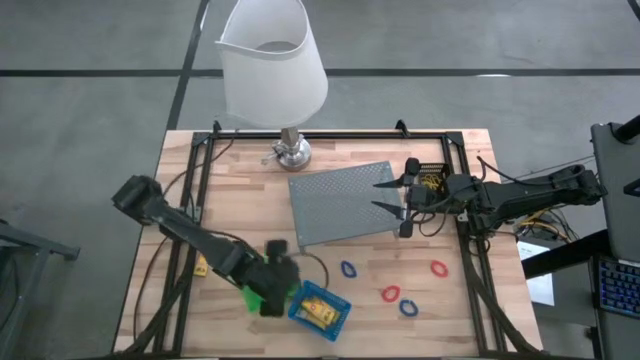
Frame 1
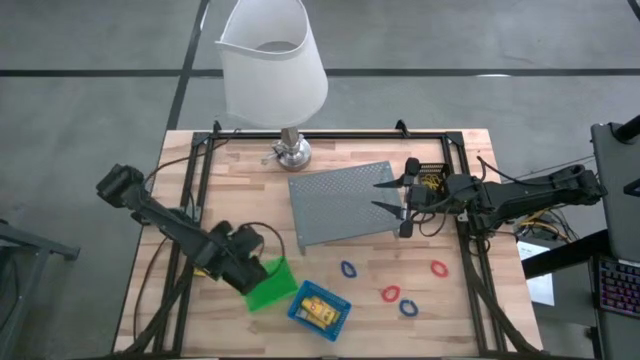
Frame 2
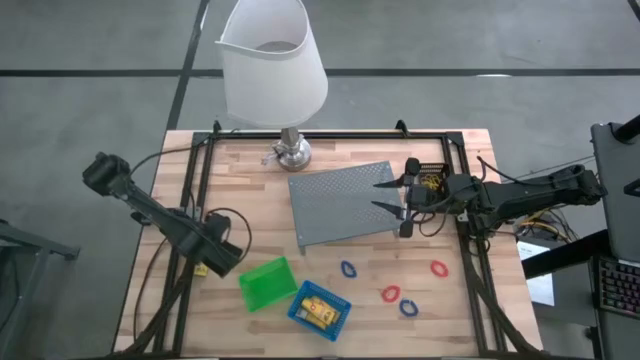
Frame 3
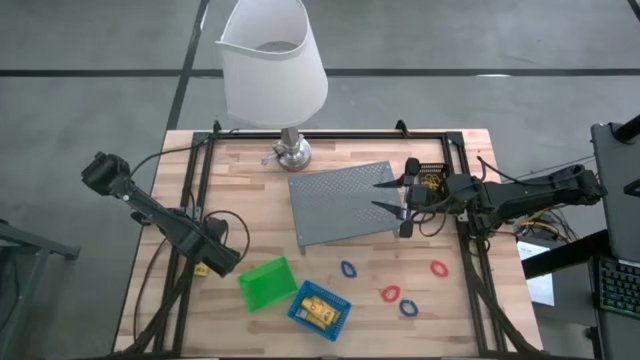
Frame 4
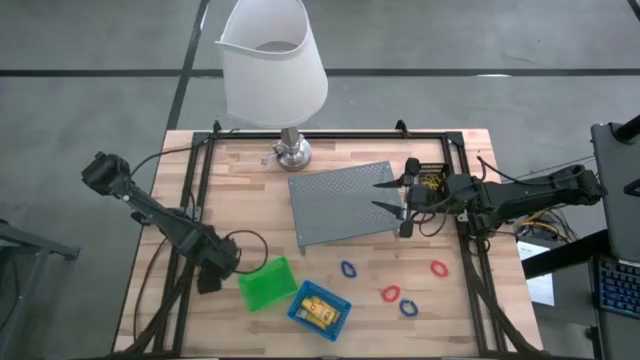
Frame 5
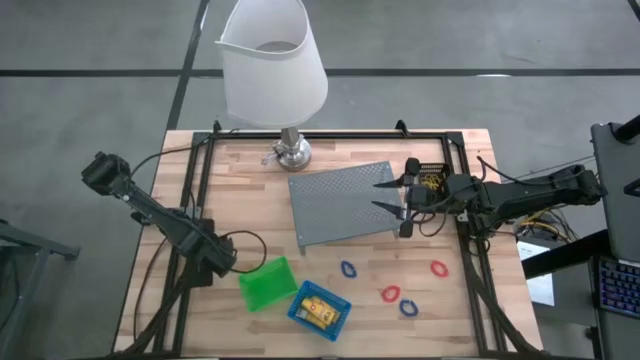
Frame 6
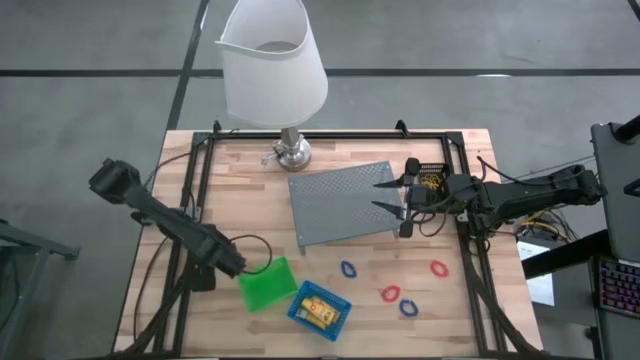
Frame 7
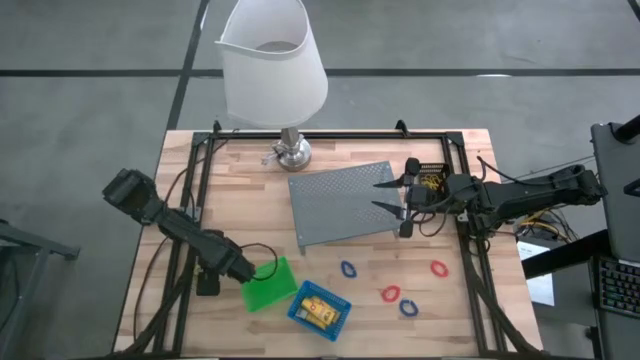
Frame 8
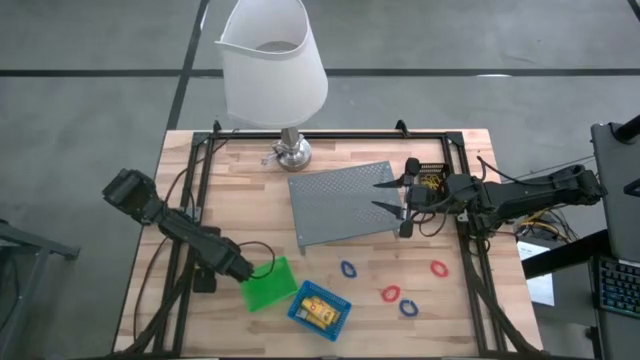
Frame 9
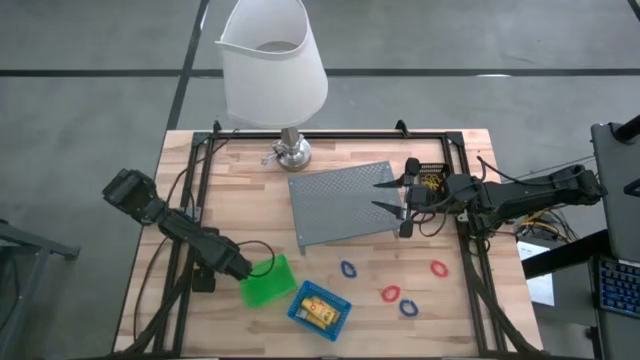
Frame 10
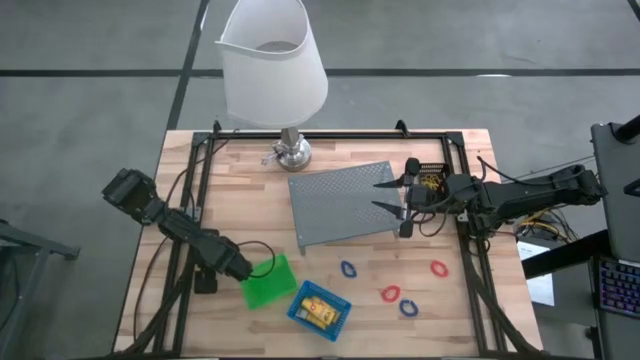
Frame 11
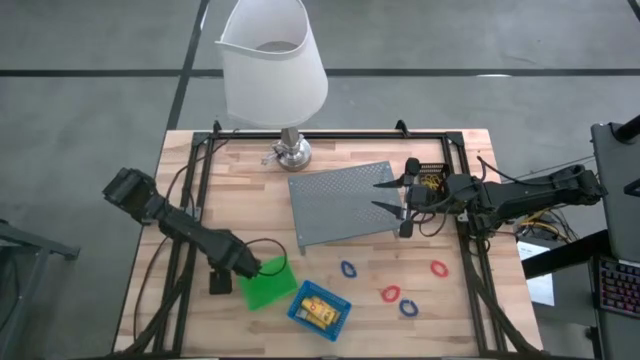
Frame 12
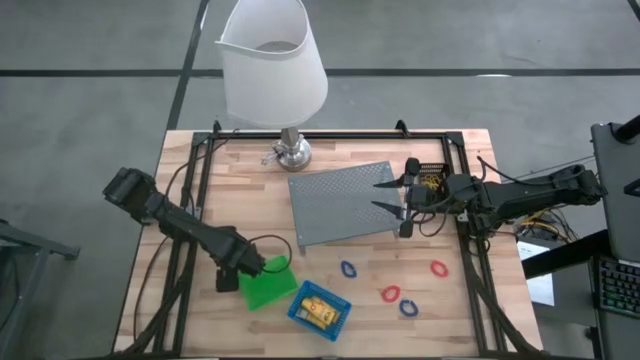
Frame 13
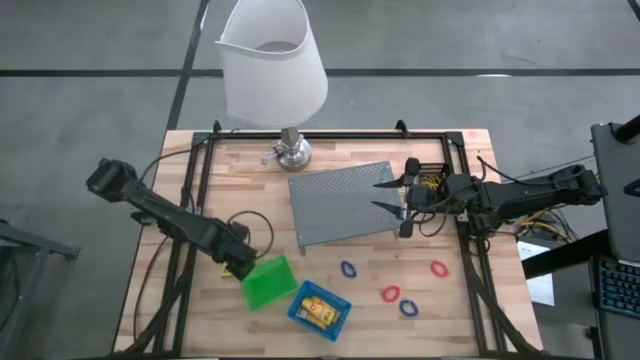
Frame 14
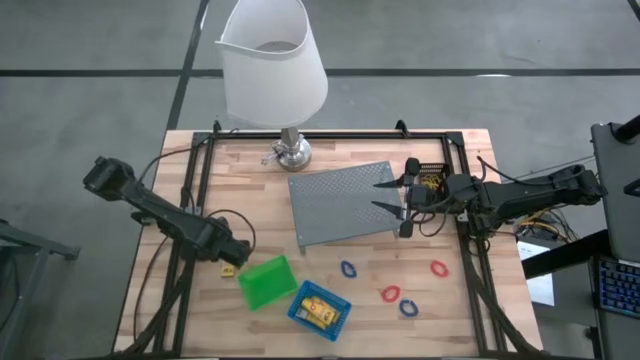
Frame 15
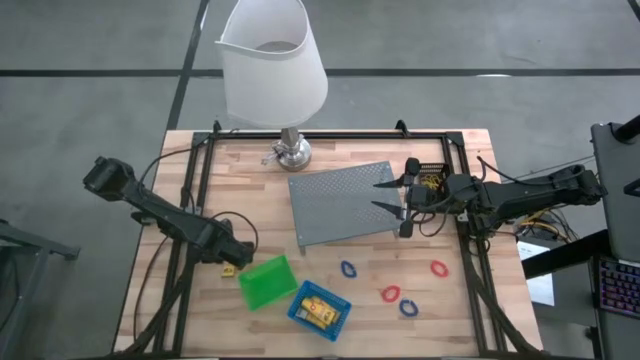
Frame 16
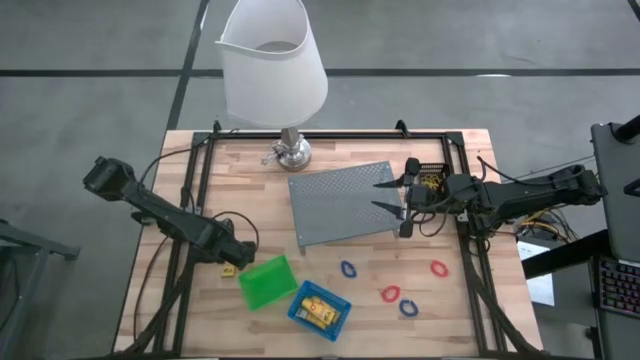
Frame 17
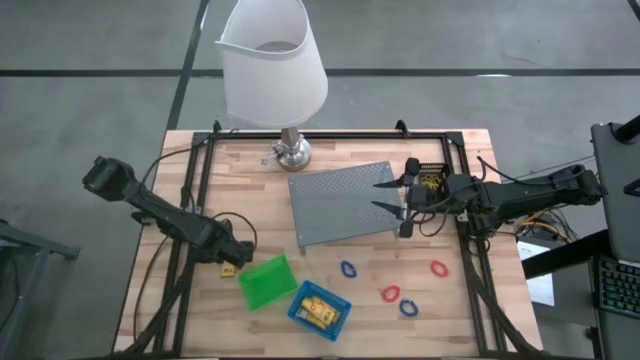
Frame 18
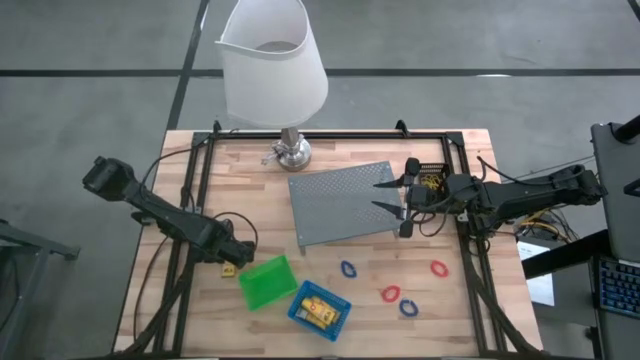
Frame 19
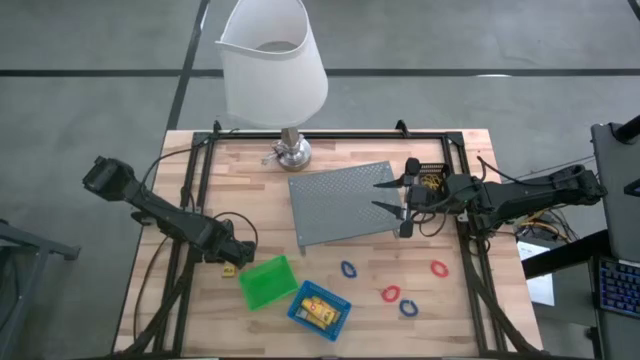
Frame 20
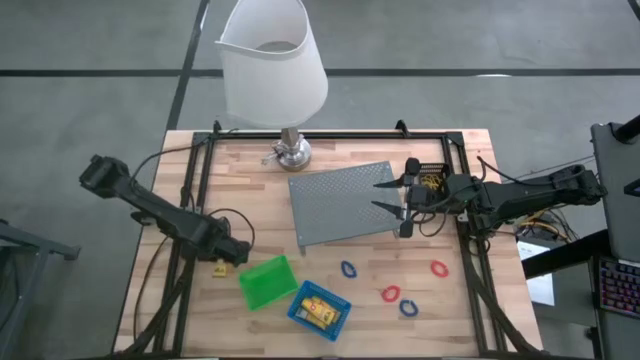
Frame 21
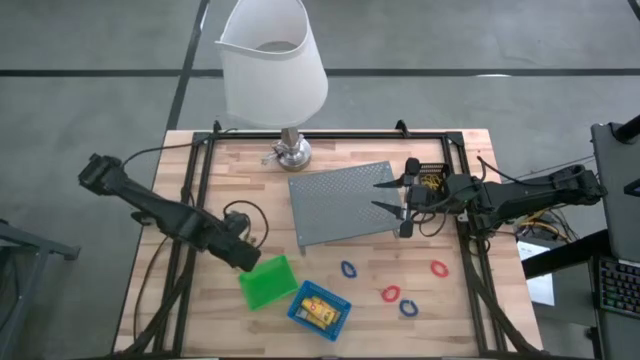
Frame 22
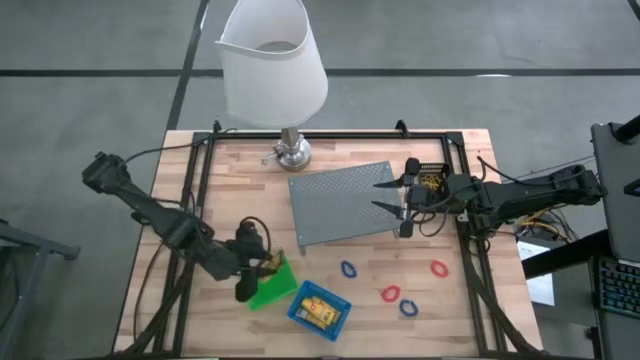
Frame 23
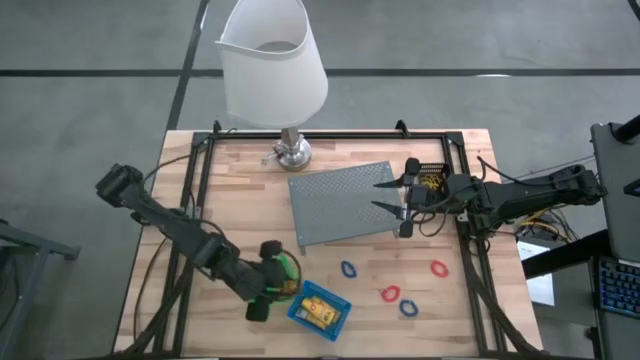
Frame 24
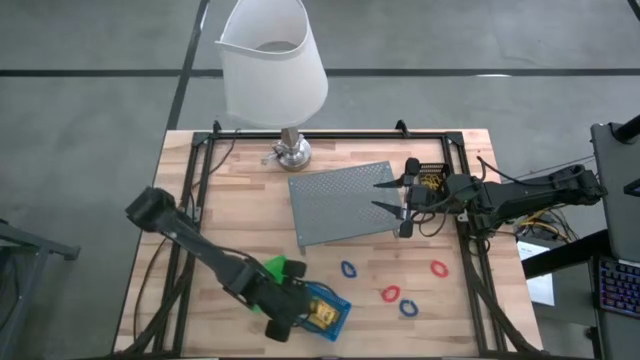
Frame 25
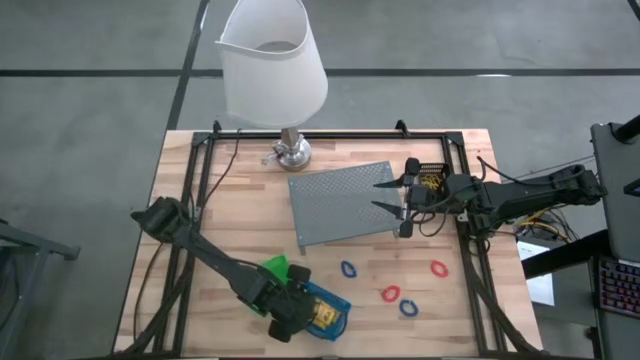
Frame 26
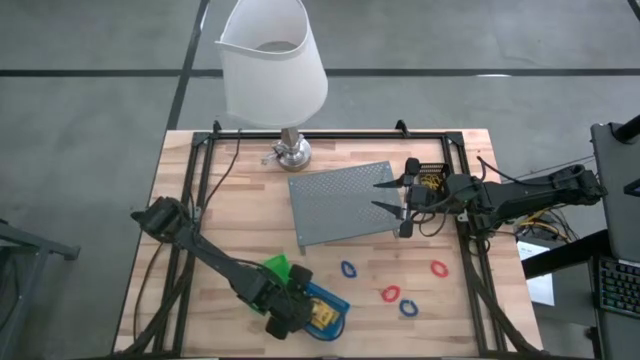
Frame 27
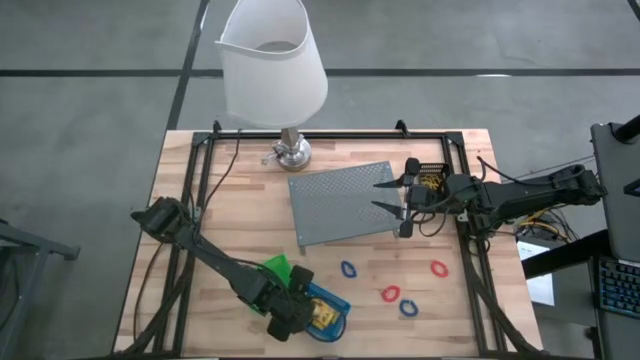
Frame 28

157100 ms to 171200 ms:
Task: Pick & Place Office Desk Supplies
Put the crayon box into the blue basket

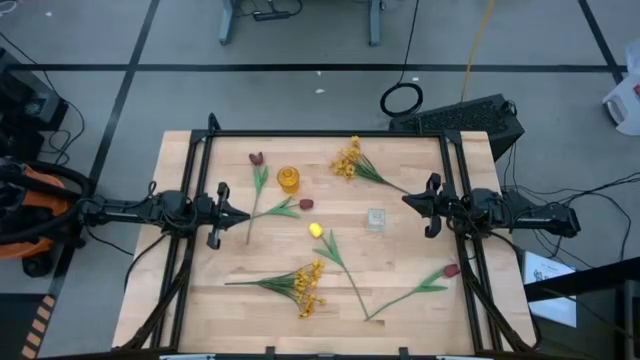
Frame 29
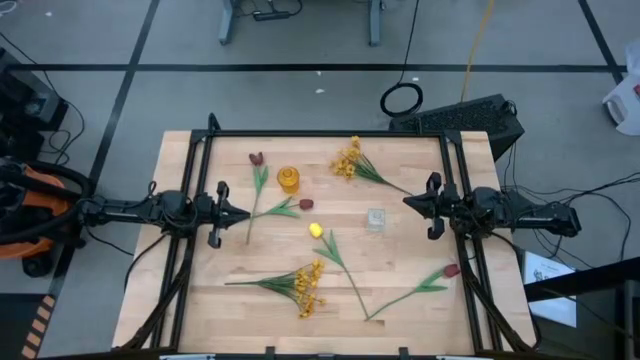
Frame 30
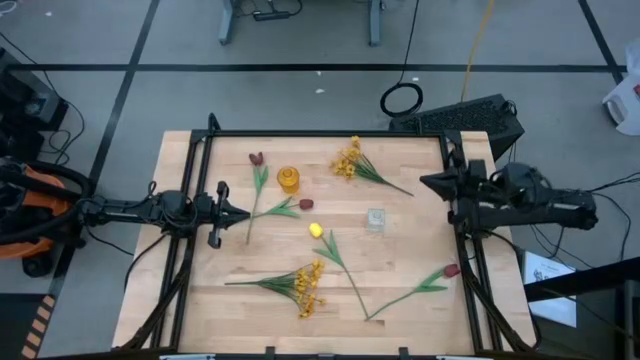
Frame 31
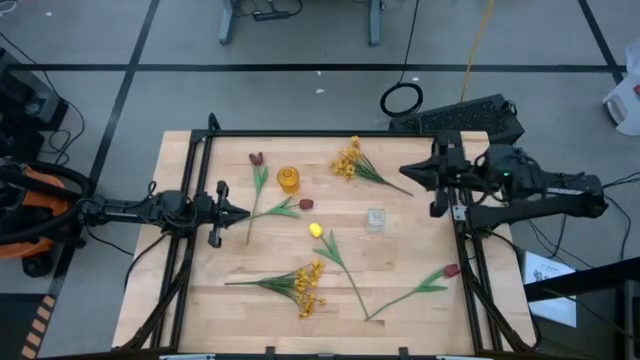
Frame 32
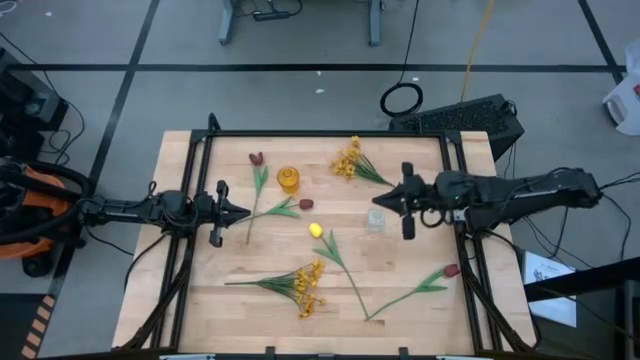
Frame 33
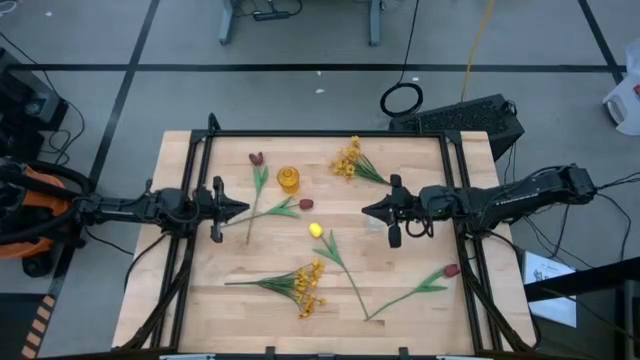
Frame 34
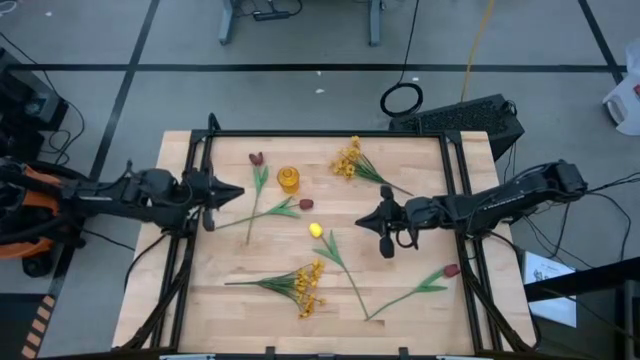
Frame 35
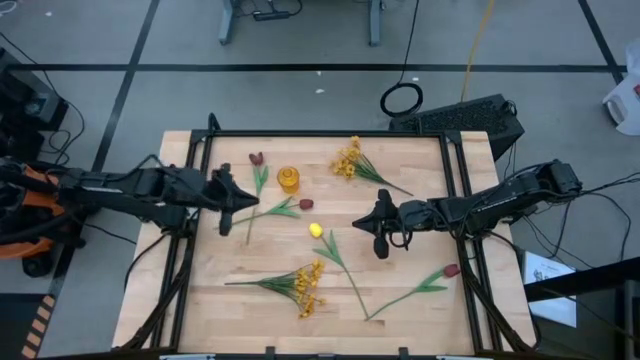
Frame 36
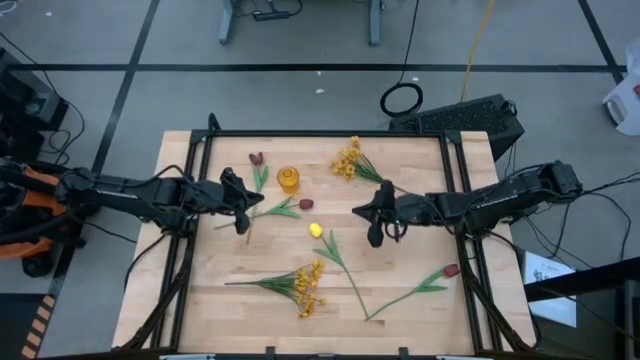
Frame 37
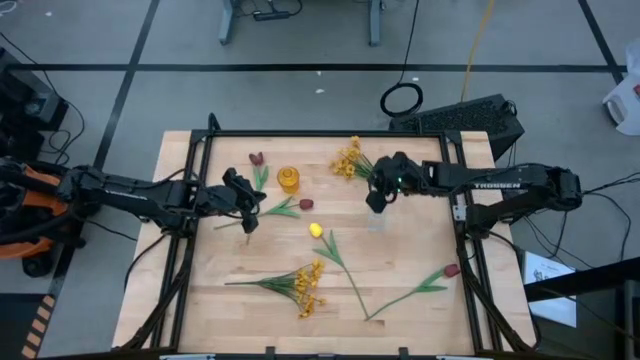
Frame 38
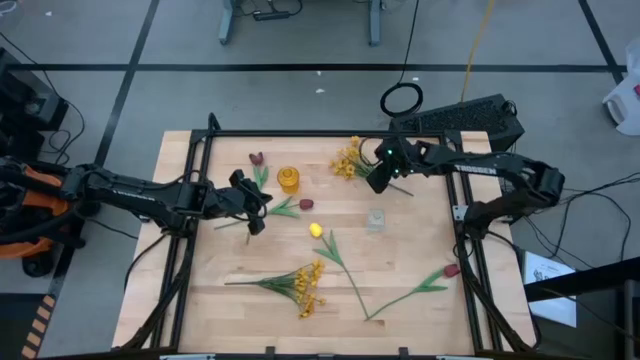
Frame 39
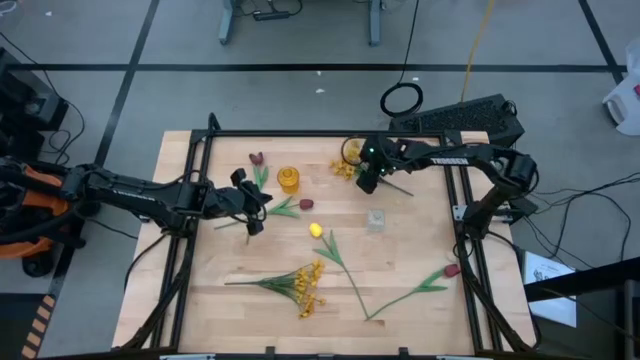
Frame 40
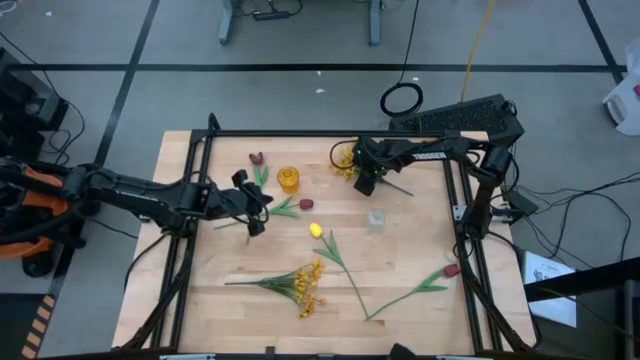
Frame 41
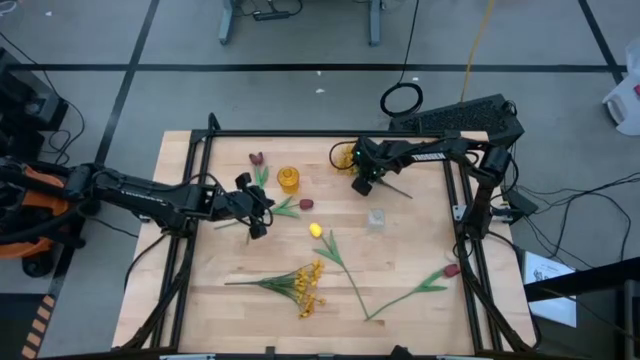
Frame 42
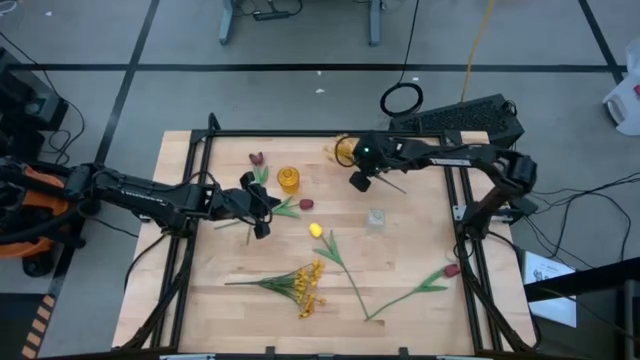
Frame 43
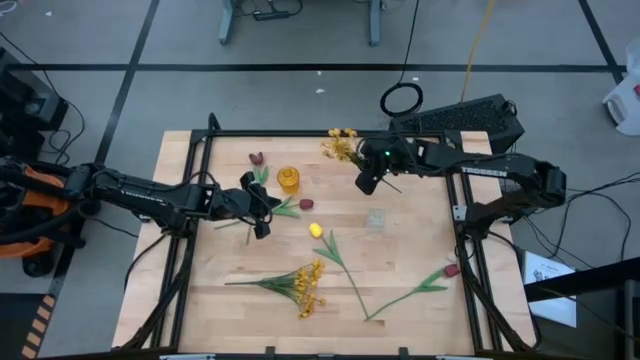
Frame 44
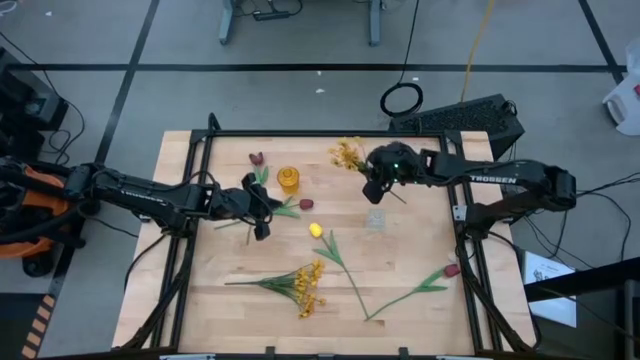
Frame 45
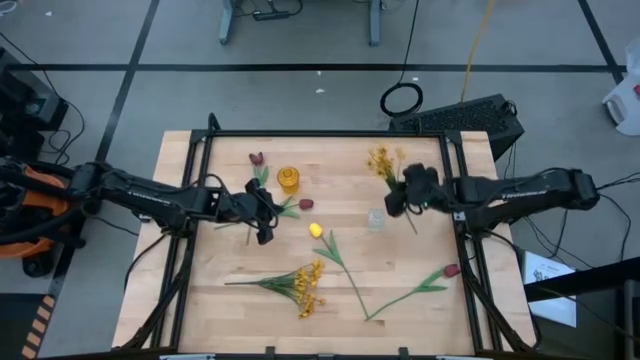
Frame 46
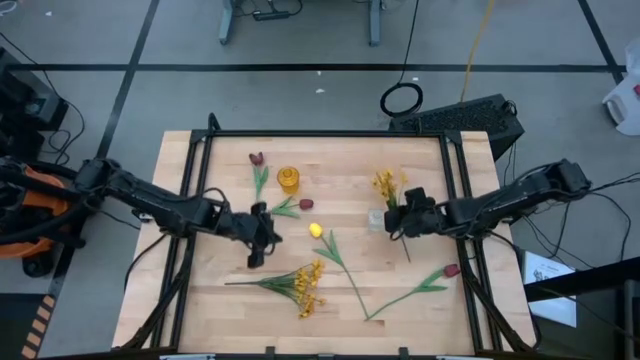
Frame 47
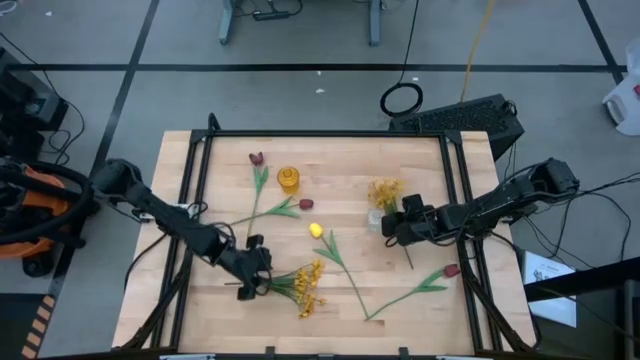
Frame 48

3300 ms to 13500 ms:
Task: Sort flowers into vase by color
Move the yellow flower to the right side of the transparent vase
